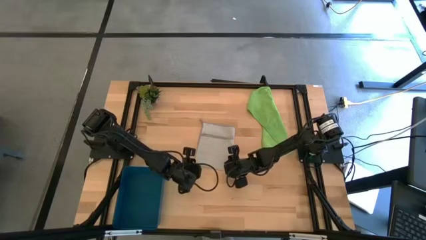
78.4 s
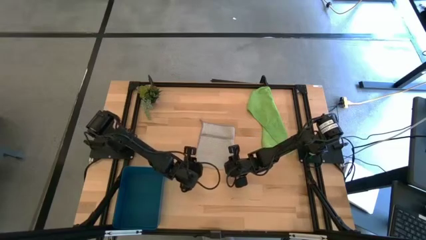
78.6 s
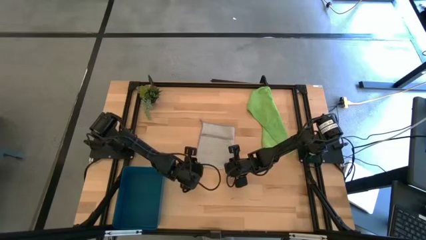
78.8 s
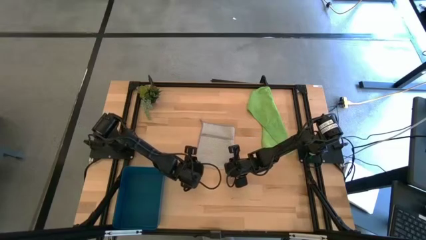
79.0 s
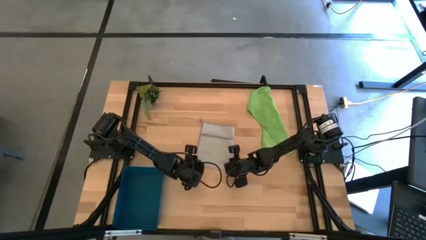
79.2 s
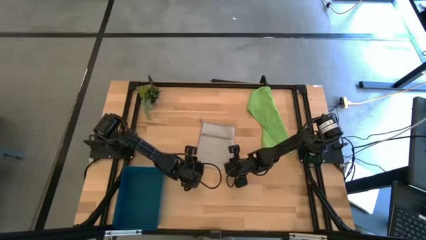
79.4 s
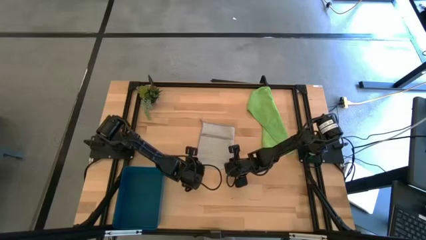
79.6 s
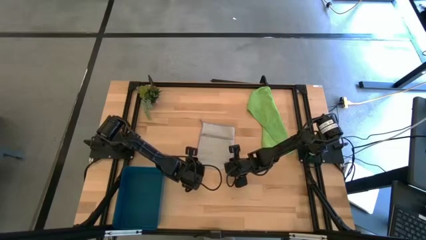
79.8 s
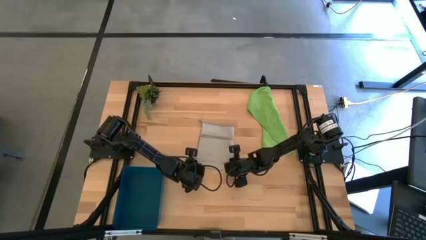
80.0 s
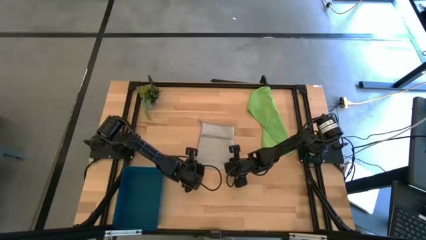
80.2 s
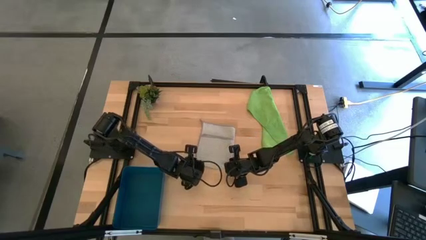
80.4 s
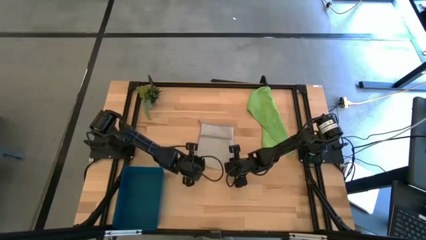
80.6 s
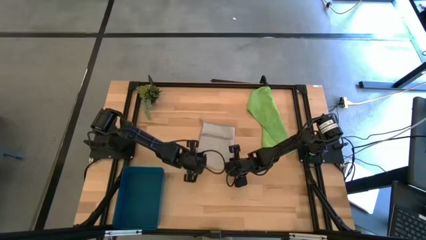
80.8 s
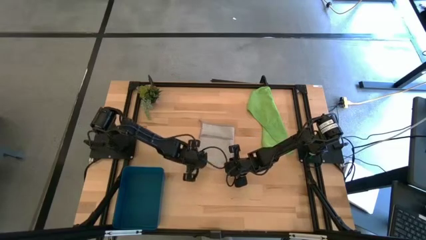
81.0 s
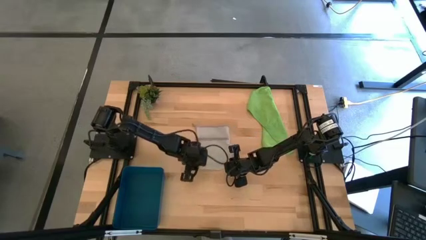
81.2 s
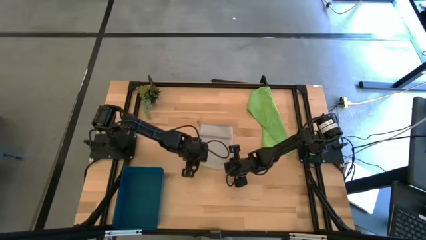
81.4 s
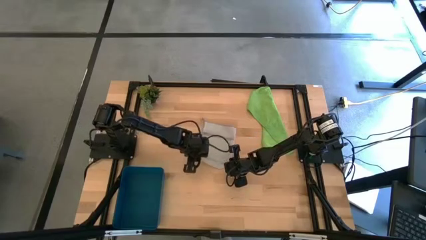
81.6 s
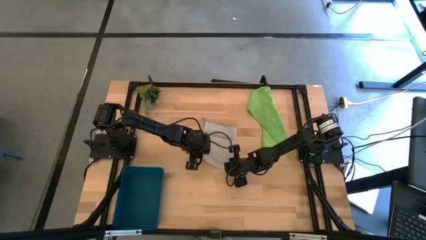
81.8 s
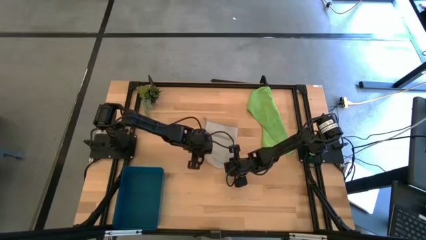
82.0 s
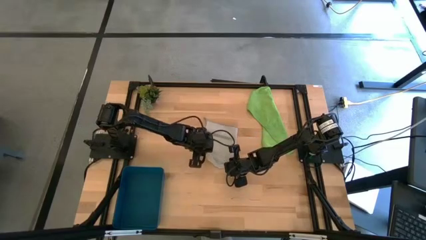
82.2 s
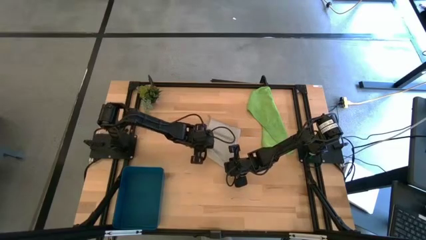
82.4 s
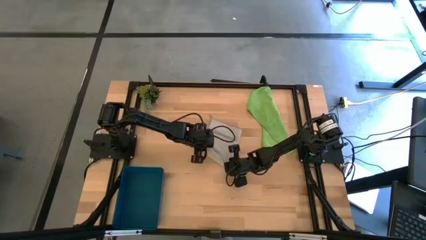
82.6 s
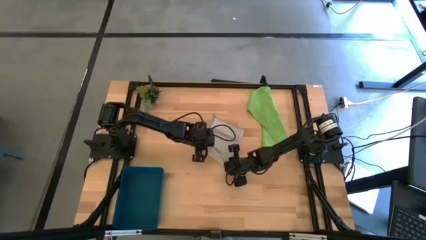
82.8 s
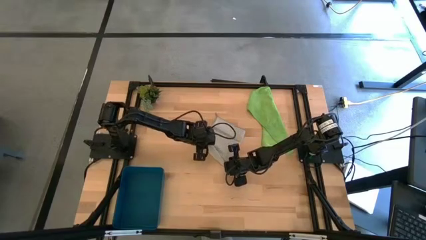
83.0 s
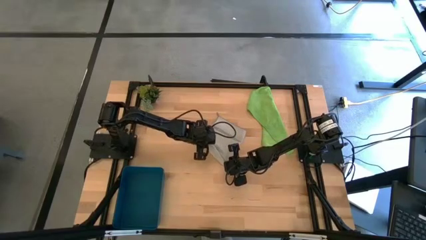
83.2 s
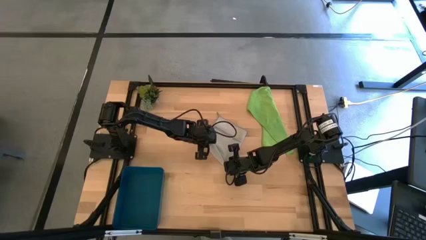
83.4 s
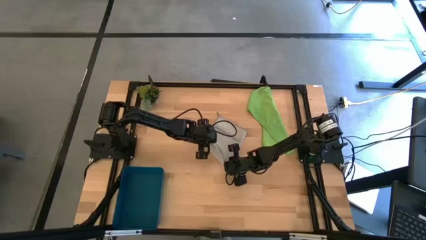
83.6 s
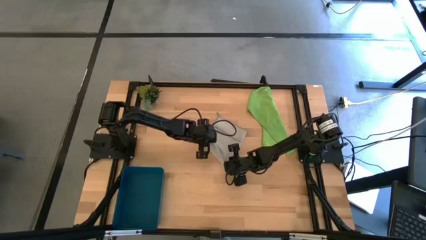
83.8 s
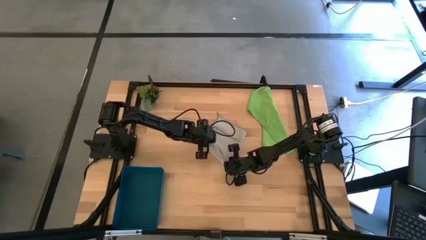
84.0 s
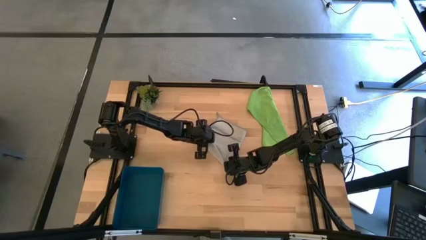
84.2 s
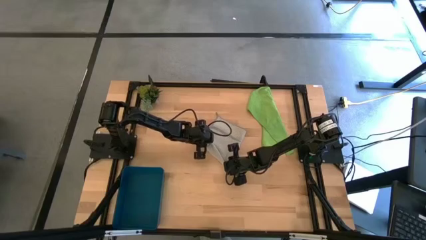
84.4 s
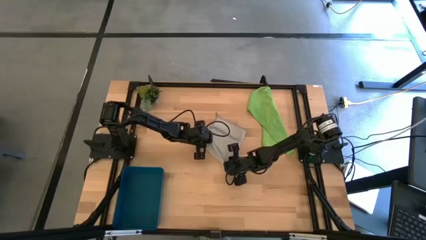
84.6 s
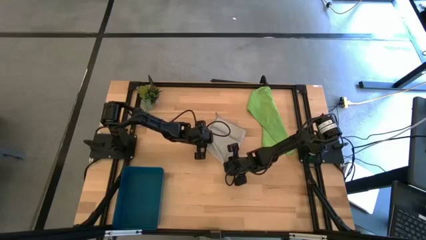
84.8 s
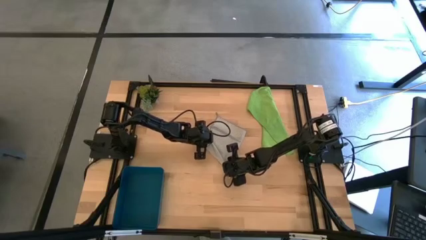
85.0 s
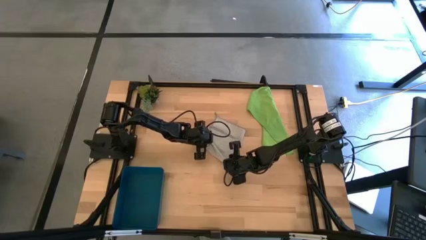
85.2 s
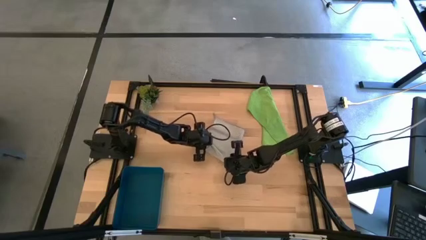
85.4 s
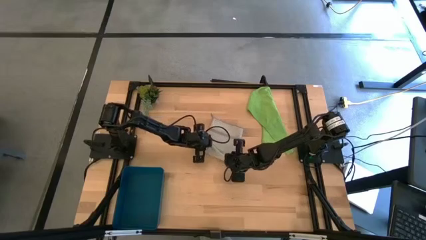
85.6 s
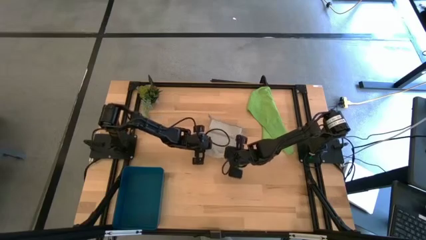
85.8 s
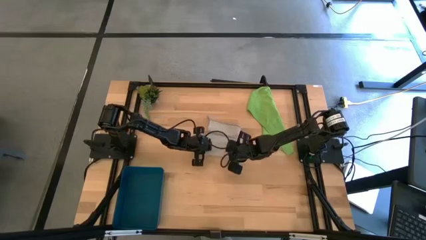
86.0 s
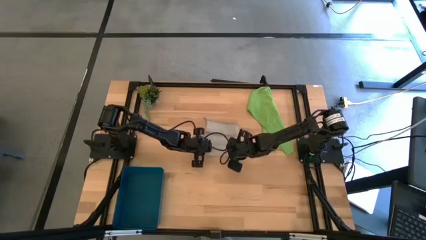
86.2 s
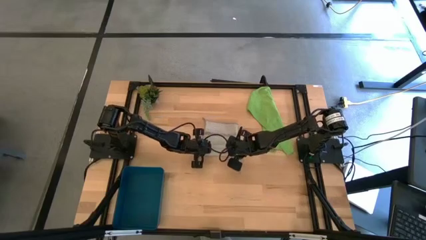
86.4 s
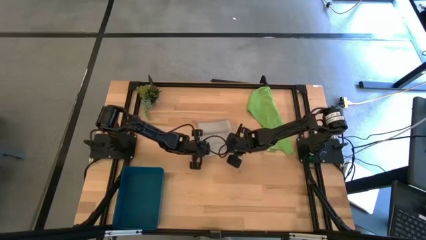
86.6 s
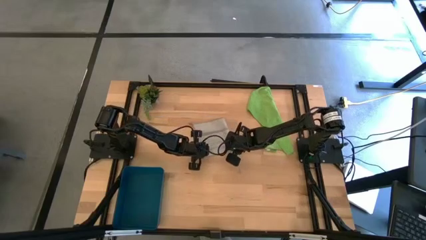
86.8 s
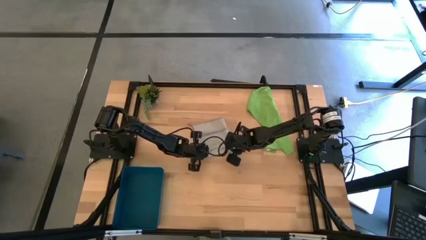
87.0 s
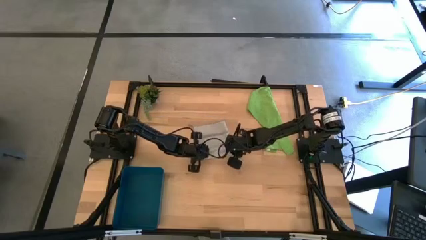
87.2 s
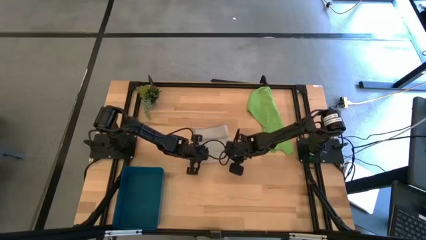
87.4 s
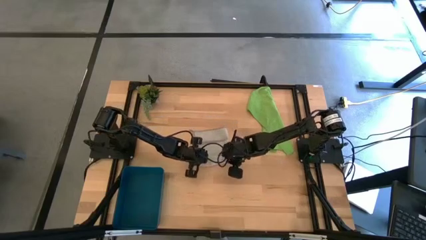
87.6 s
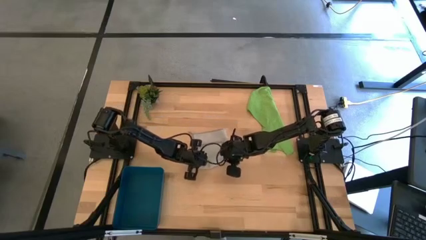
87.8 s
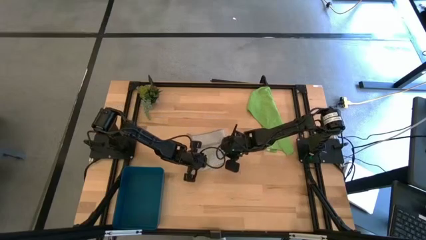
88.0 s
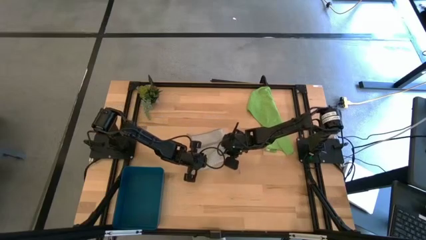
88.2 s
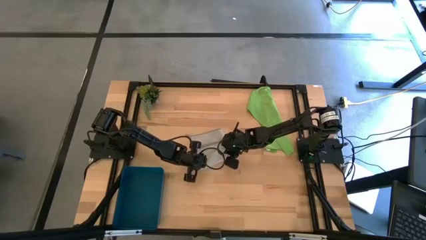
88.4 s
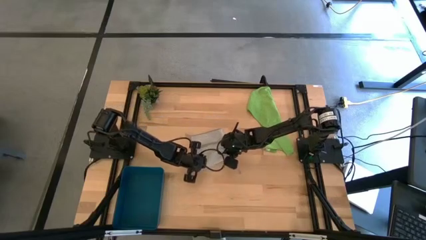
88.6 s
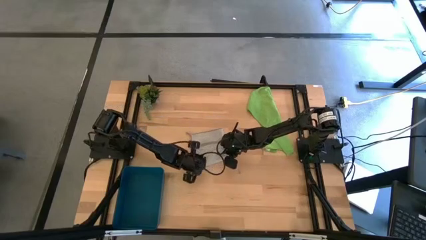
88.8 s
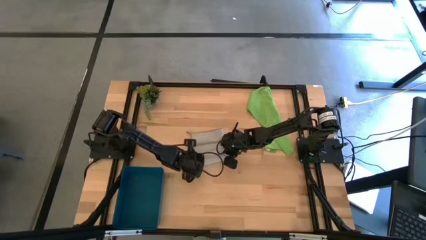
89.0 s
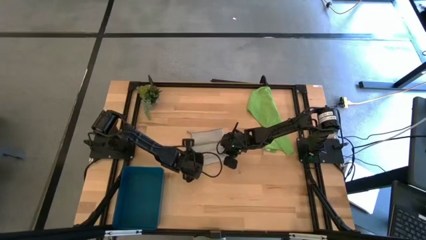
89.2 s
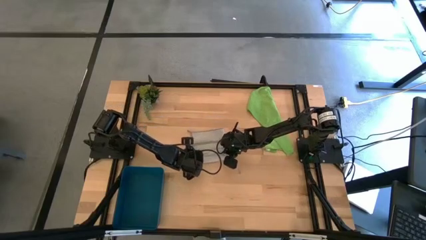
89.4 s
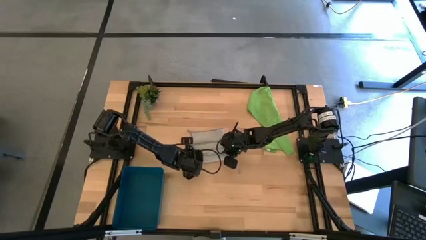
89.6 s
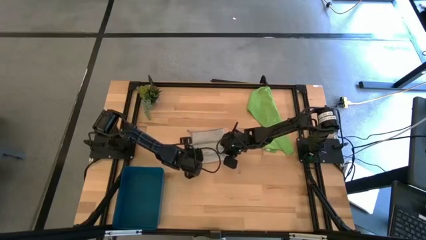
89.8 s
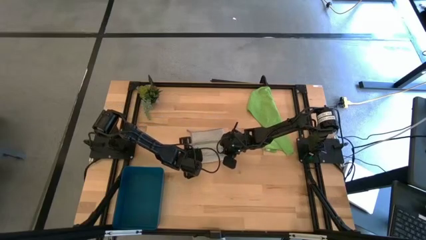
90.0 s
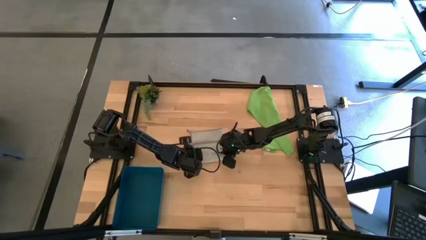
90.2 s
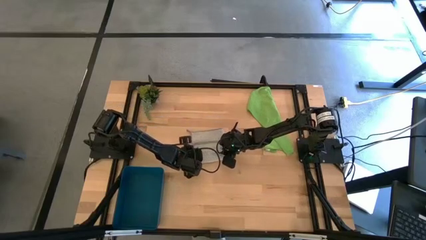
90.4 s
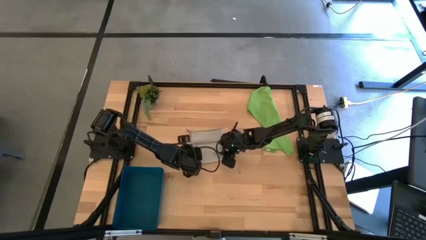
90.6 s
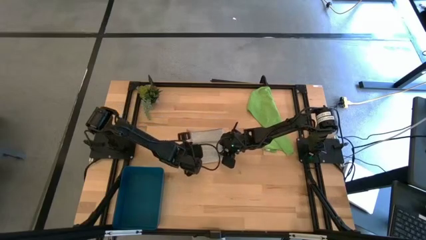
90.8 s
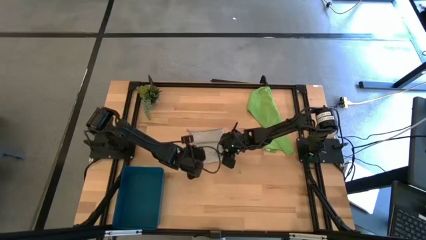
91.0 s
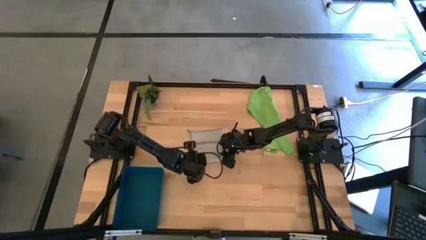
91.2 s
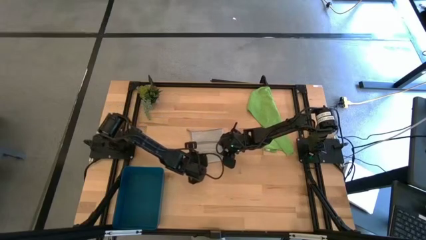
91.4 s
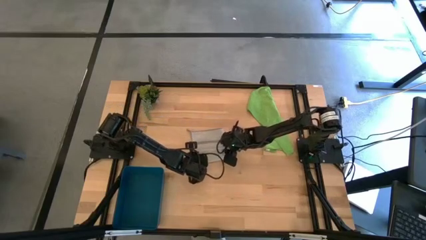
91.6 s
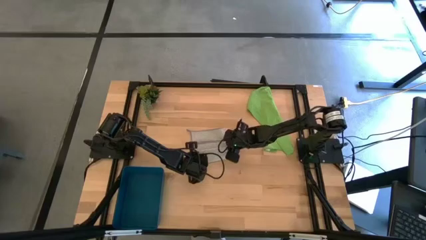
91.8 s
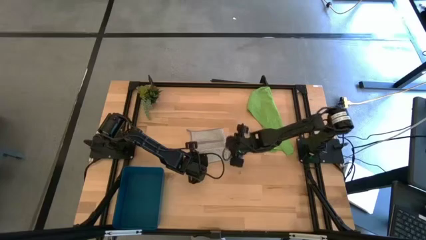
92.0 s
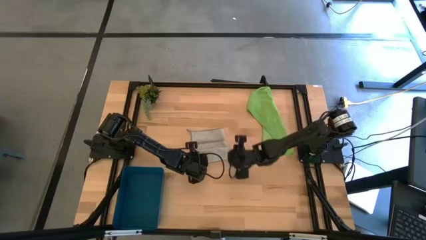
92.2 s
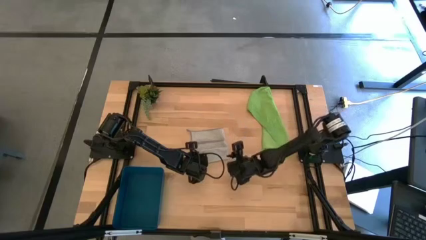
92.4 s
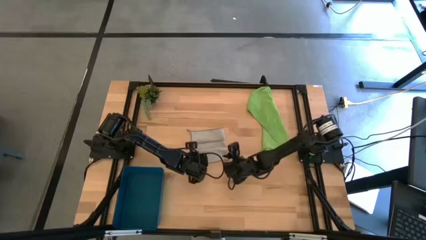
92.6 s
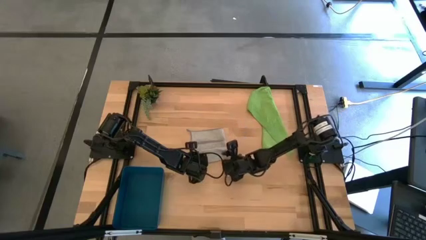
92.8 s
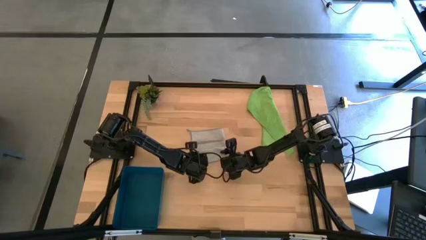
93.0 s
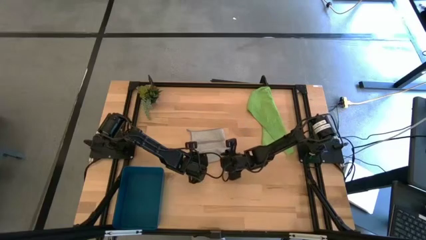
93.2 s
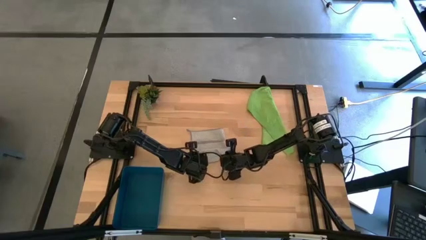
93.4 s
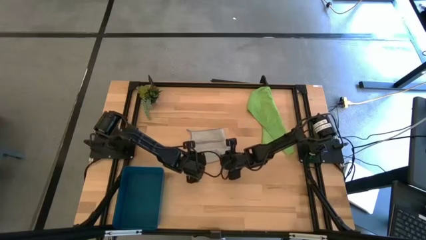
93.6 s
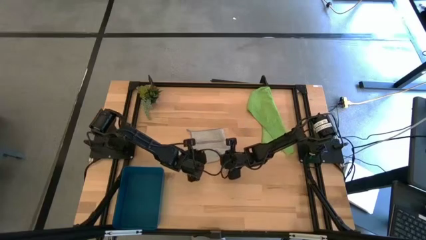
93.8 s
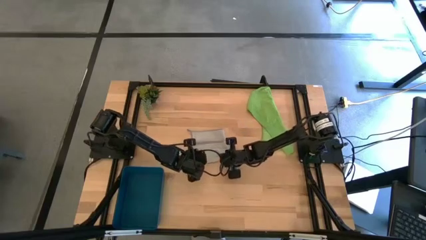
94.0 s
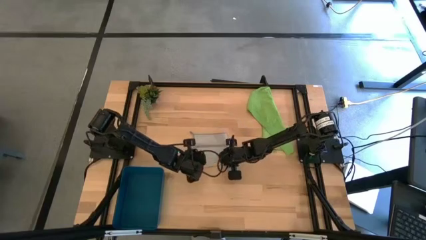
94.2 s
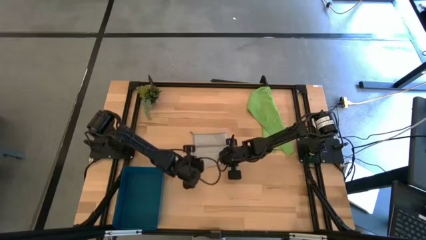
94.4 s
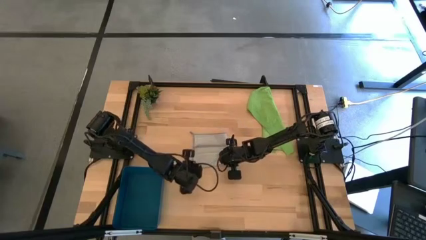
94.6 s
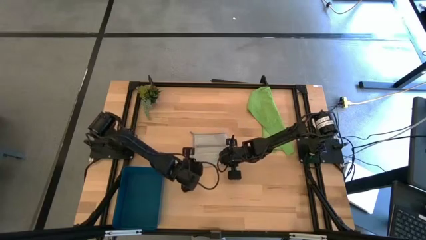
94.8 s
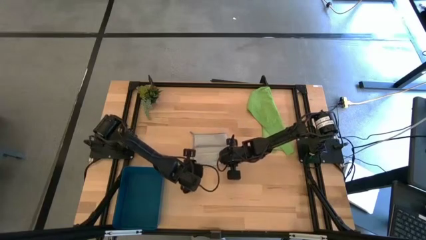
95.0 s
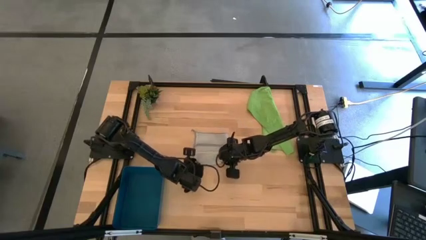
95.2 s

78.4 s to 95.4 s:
Task: Roll microfiber towels into tight, uniform cylinder then place into a basket
Roll the gray towel
